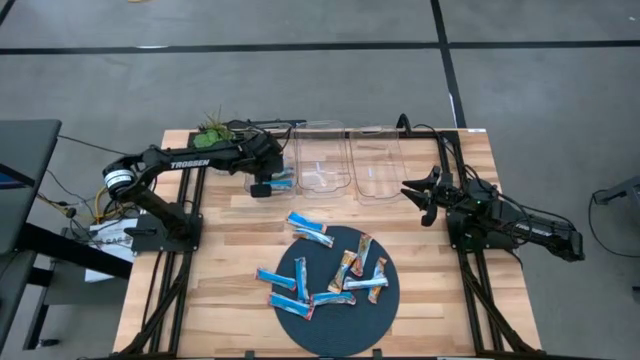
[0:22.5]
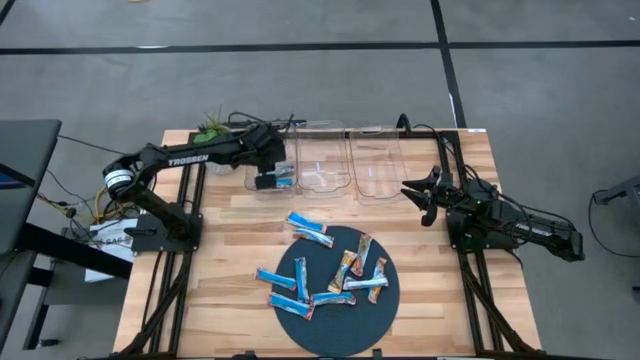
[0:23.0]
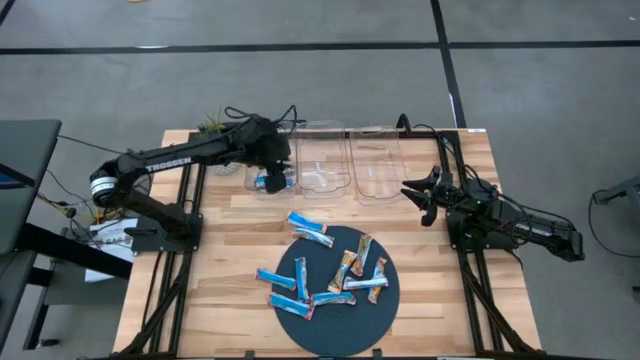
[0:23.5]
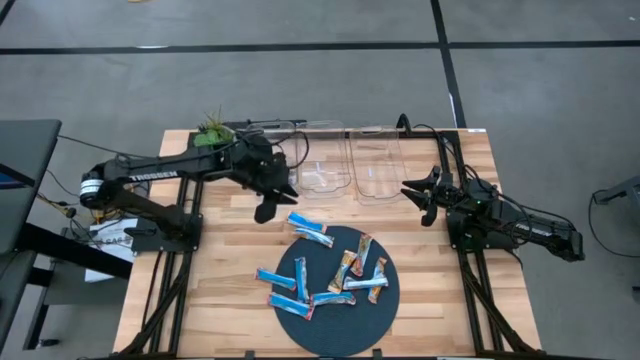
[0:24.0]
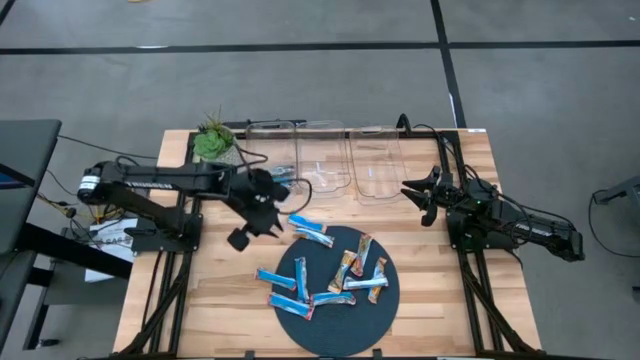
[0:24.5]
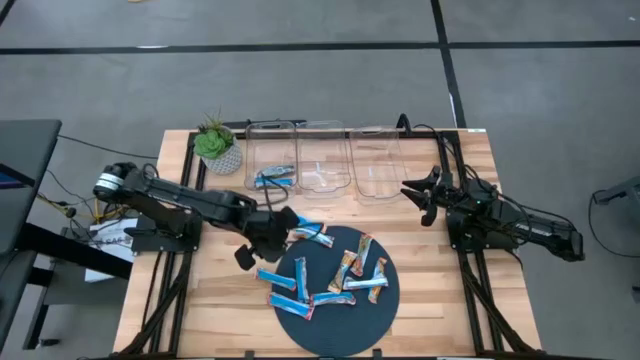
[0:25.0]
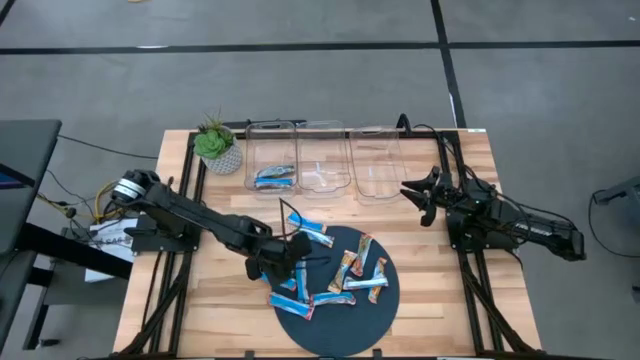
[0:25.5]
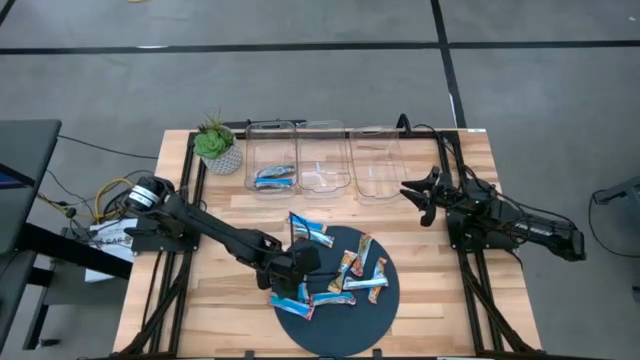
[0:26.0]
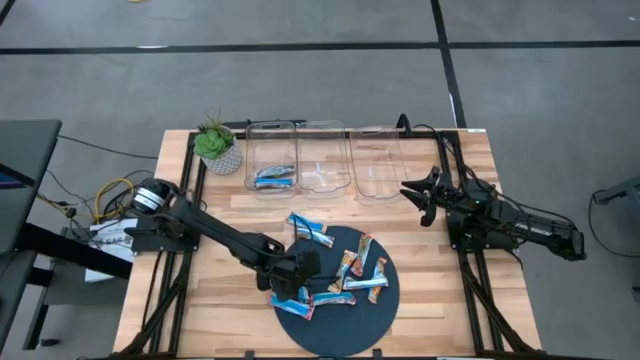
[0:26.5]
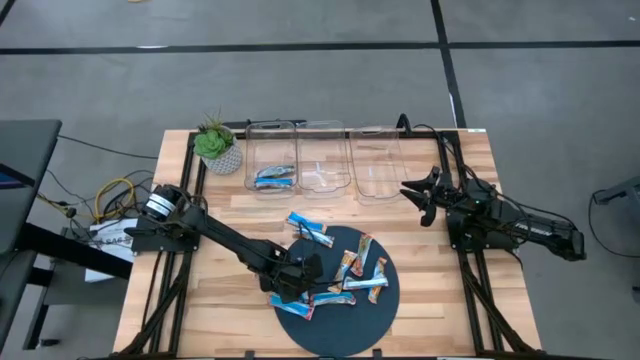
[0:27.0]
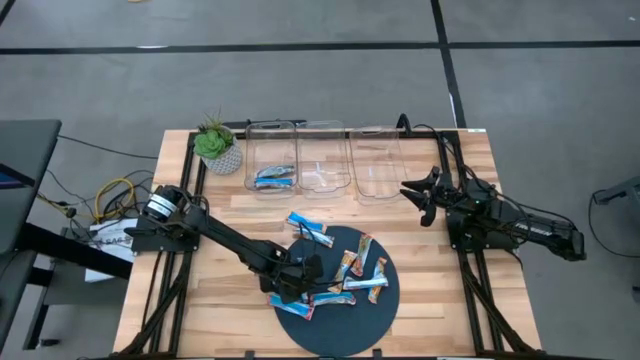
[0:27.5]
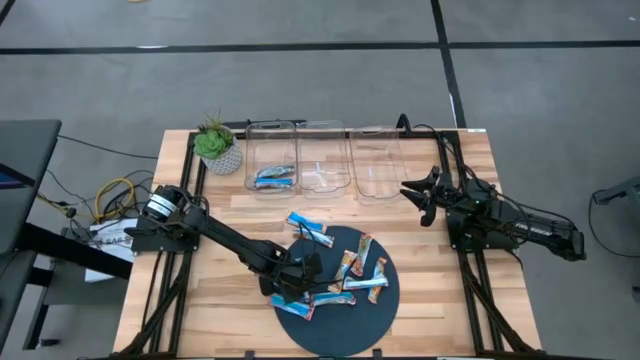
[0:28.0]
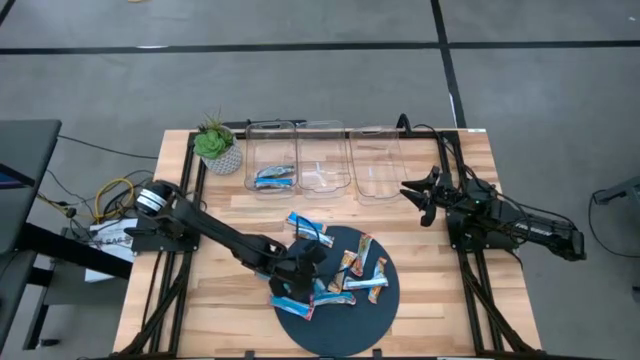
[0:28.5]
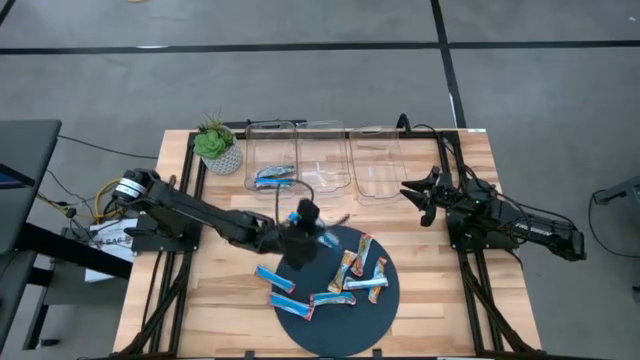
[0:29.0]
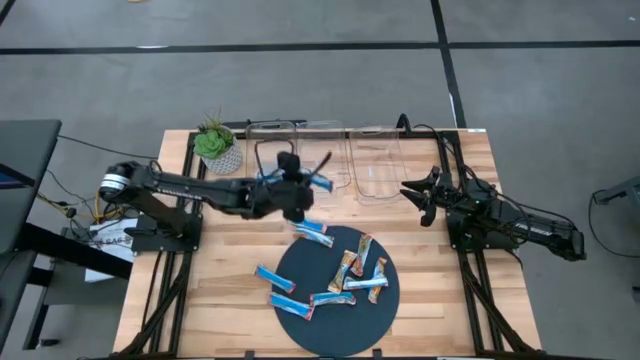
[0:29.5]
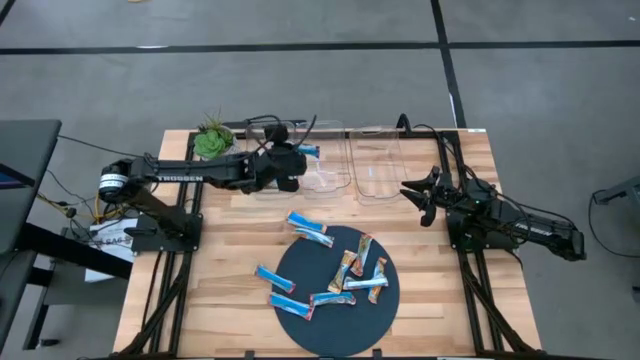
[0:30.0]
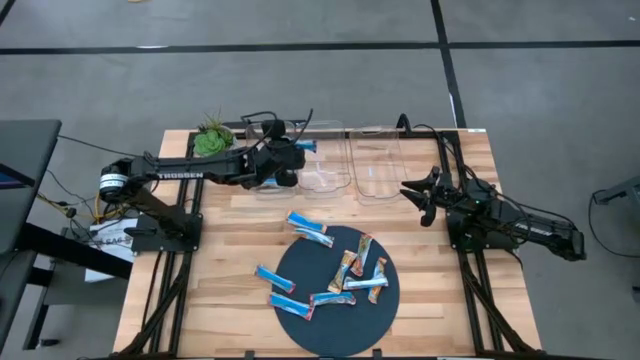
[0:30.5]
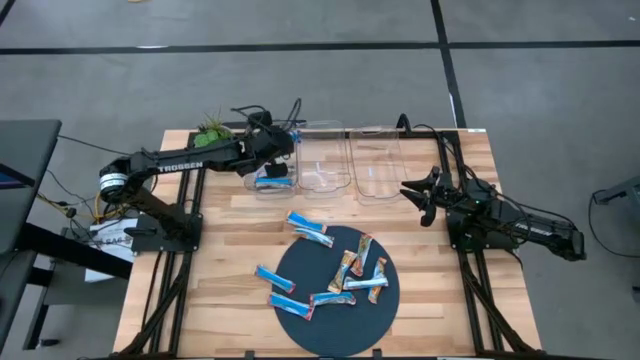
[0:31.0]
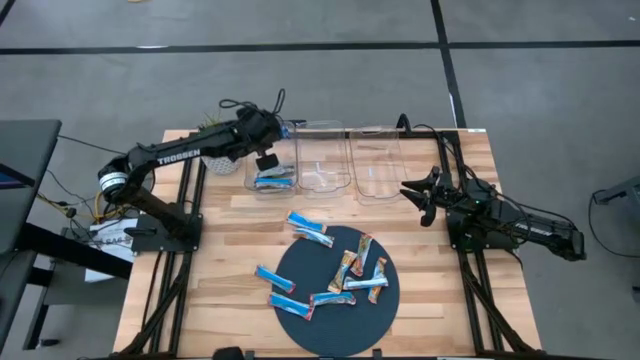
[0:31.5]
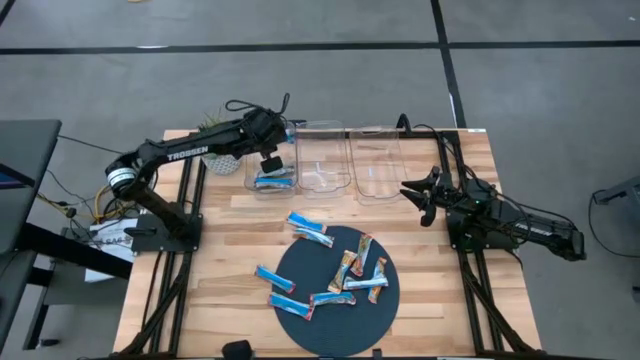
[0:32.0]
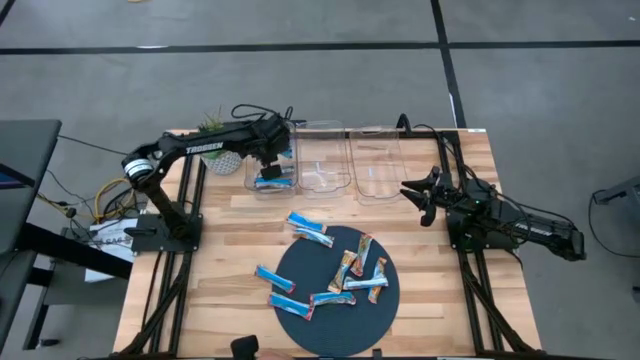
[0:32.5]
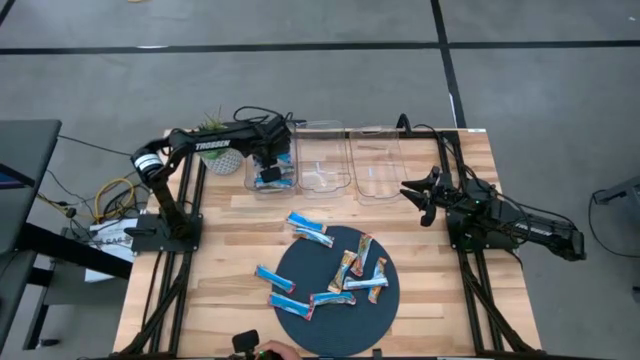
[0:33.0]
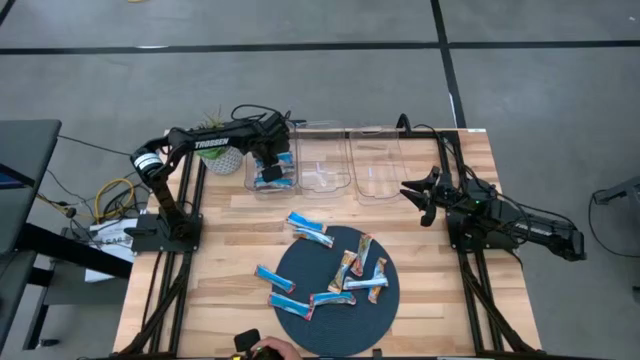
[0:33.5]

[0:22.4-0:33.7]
Task: Pick and place Granola Bars by type
Put the blue granola bar into the left transparent bin

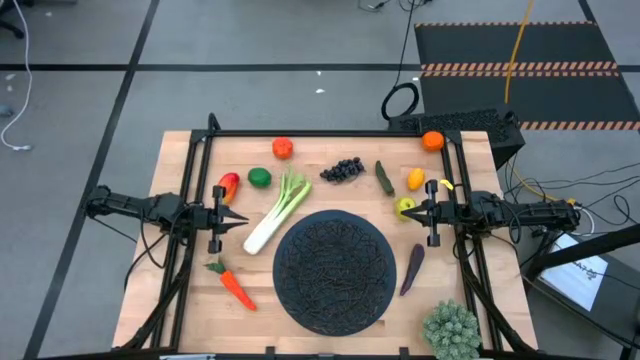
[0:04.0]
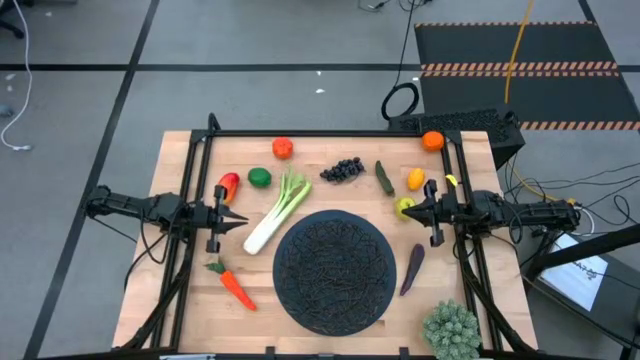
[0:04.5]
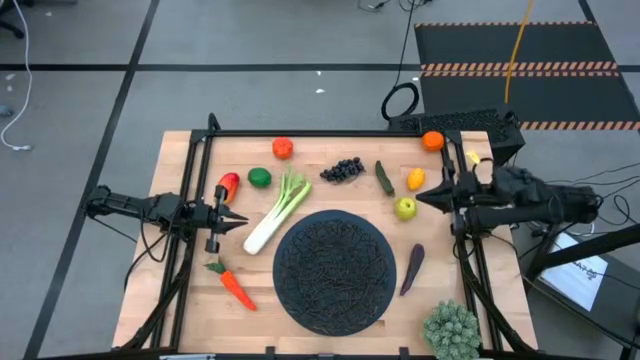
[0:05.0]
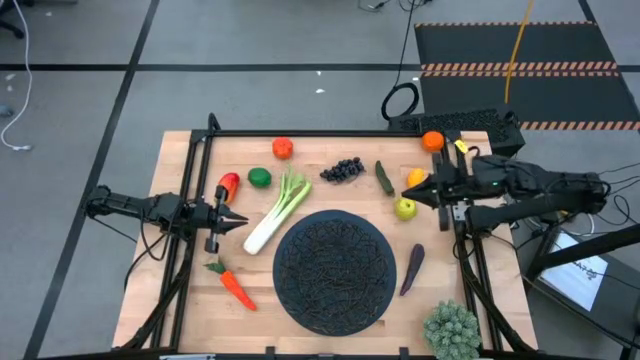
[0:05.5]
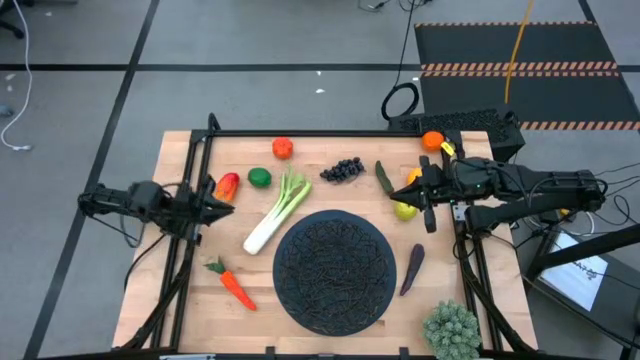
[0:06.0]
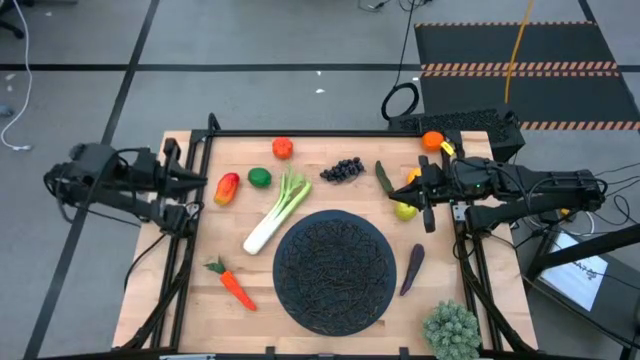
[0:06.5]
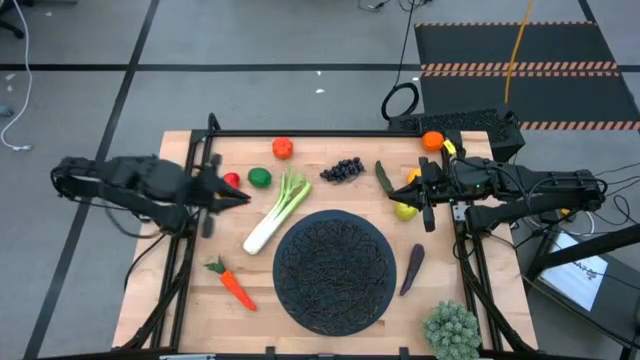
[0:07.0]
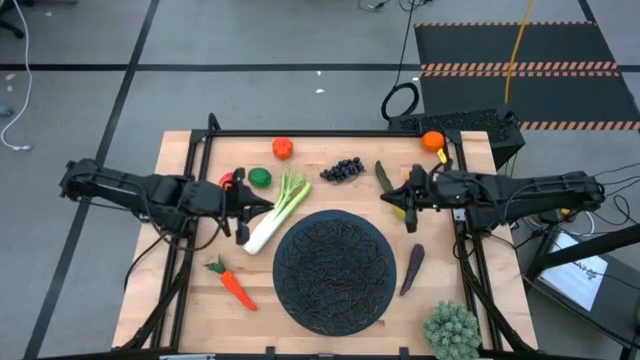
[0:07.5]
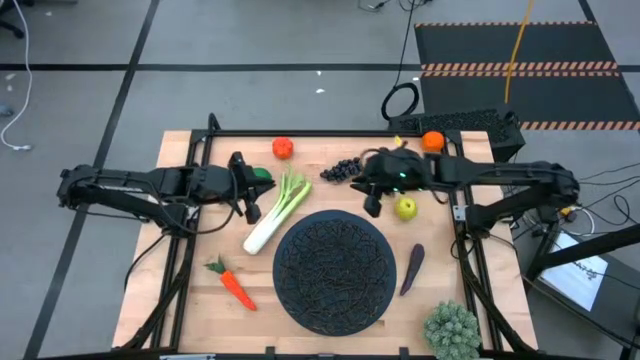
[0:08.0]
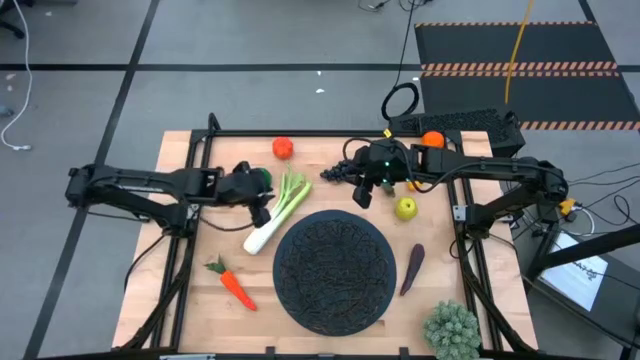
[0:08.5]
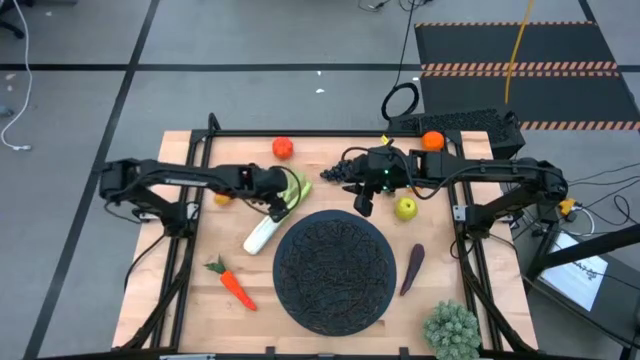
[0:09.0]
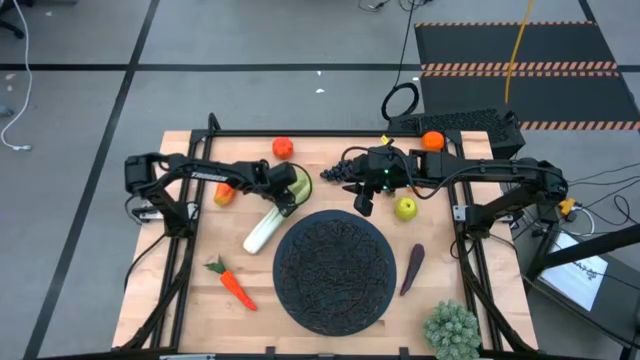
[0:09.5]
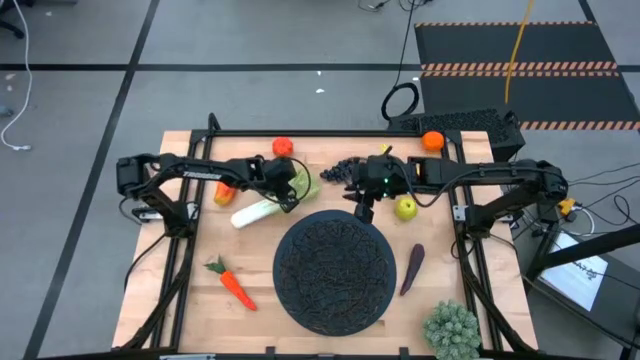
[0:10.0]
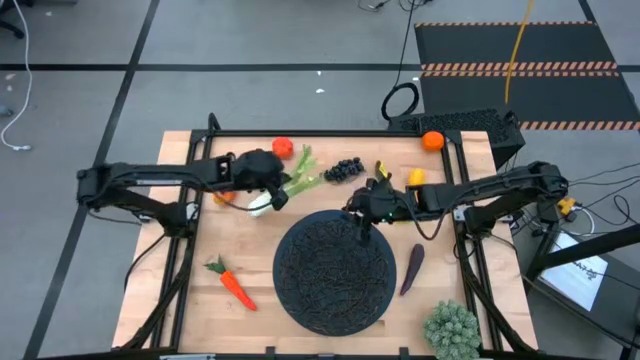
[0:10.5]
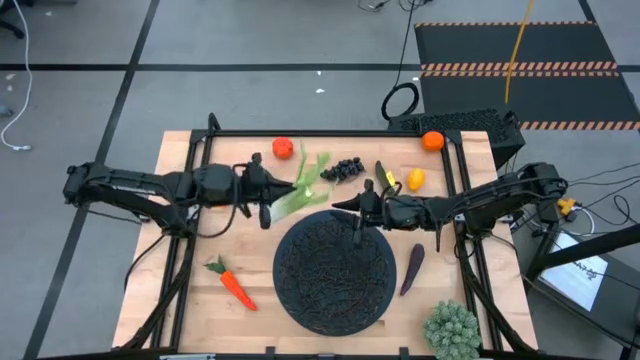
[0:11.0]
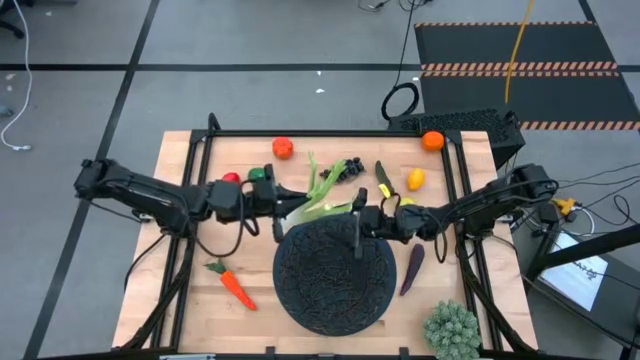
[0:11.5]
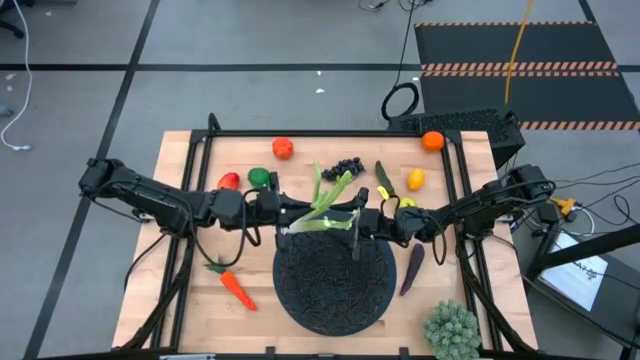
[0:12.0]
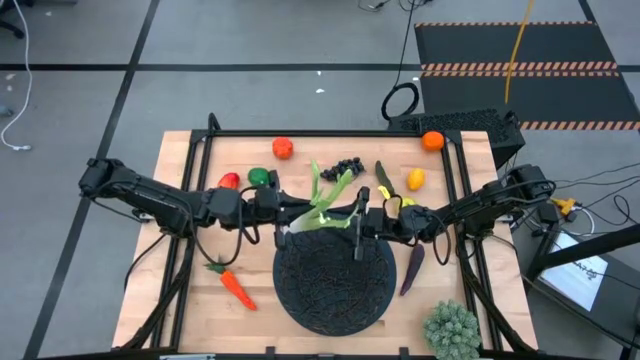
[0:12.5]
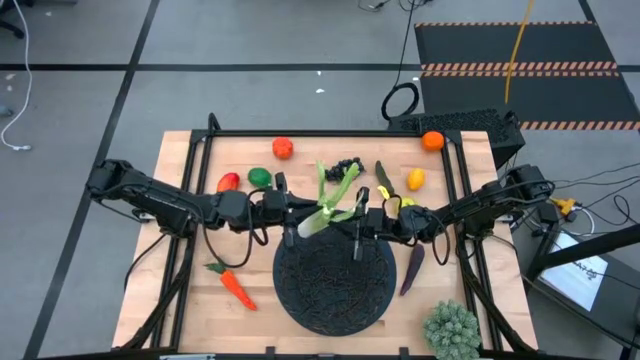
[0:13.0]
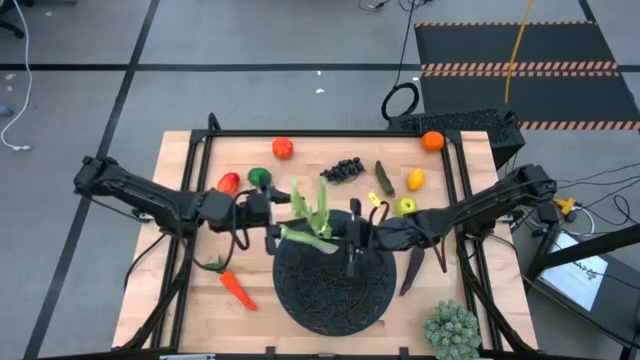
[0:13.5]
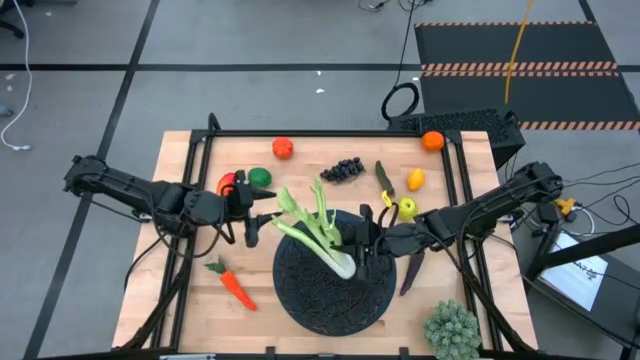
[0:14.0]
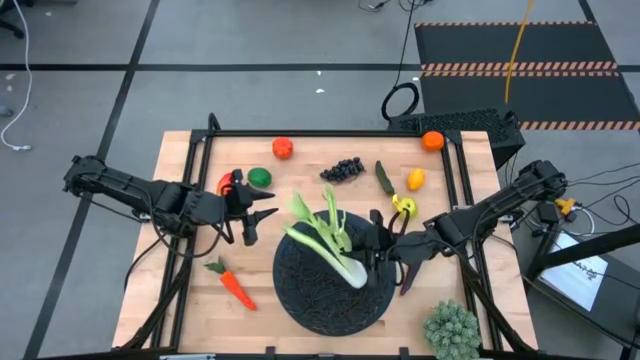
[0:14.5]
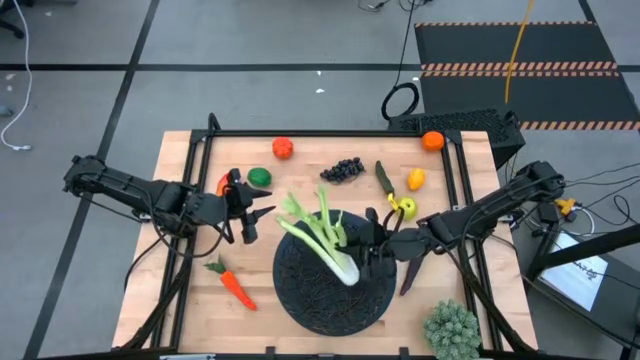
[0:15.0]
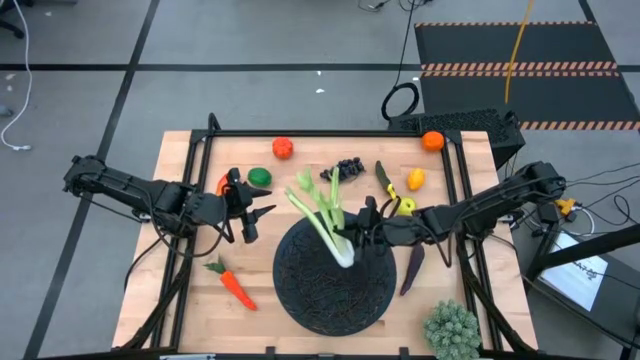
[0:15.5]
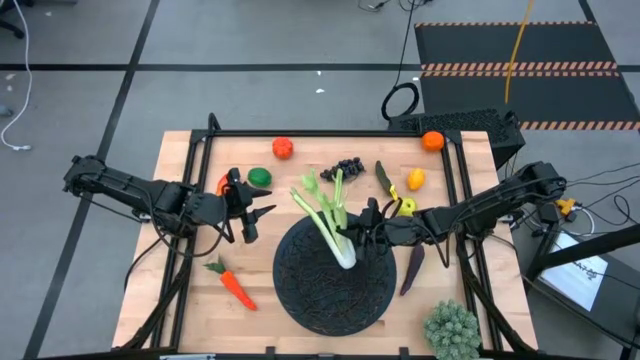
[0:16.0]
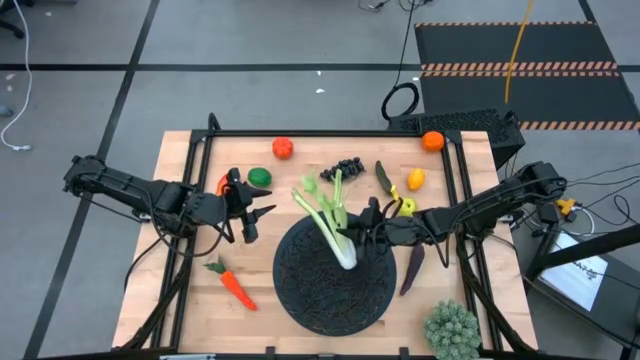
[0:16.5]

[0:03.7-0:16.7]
Task: Build produce basket
Put the green celery into the black mesh basket
